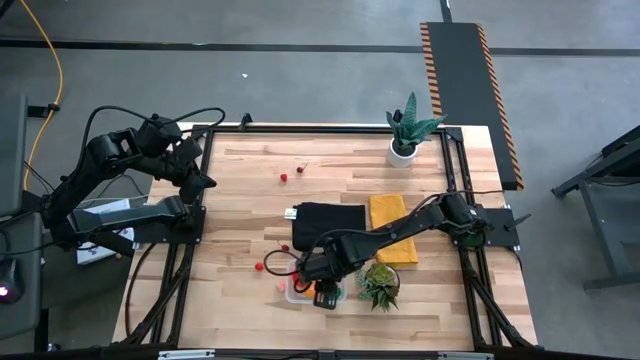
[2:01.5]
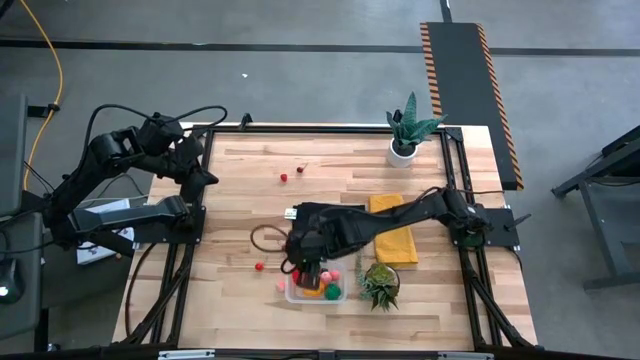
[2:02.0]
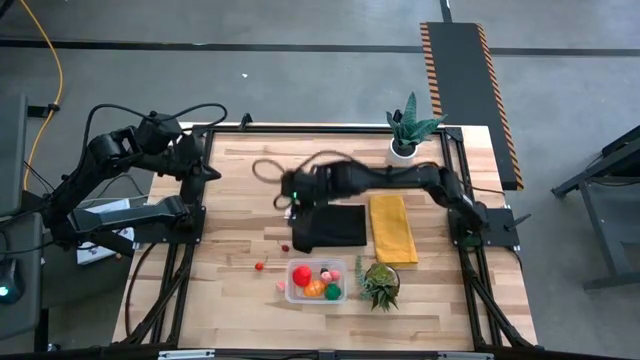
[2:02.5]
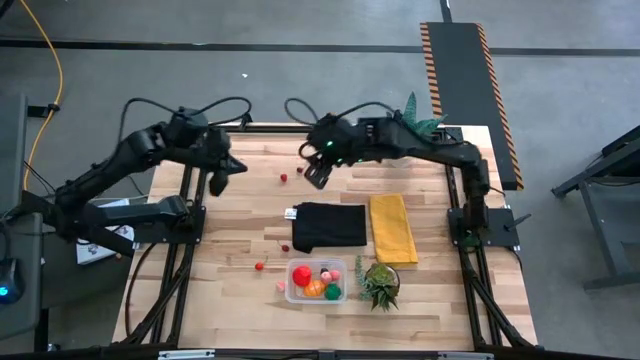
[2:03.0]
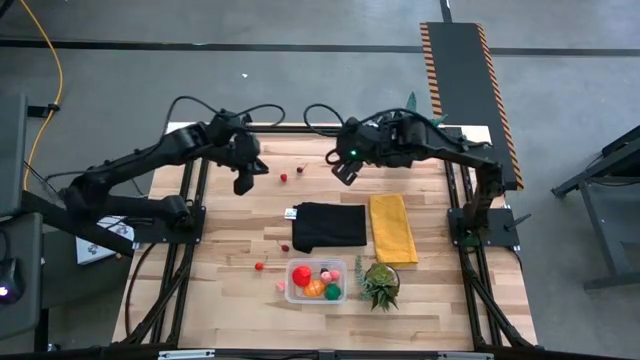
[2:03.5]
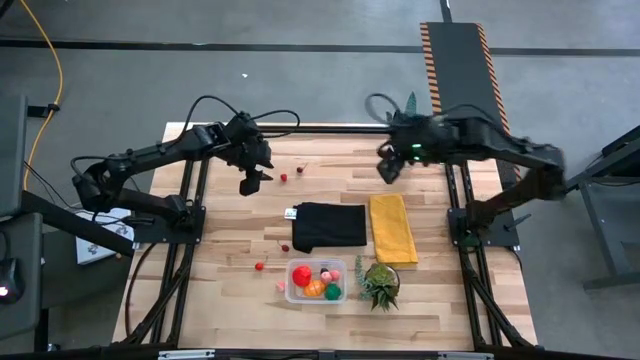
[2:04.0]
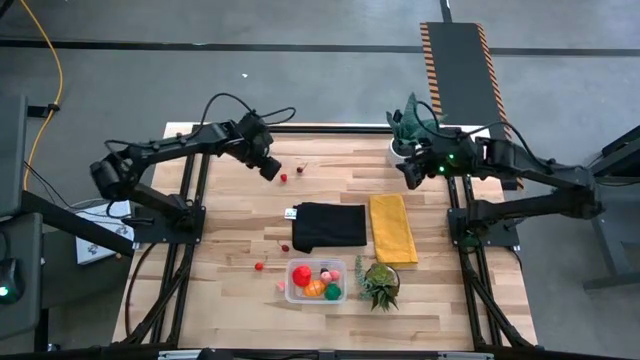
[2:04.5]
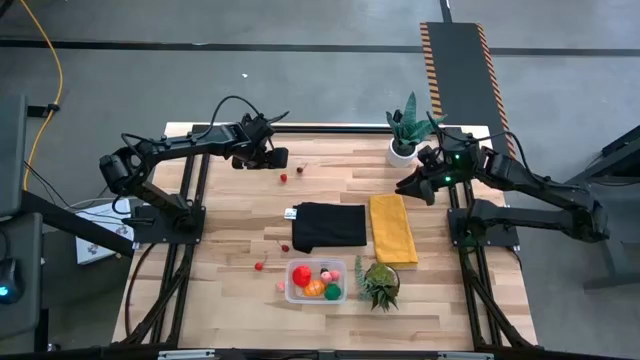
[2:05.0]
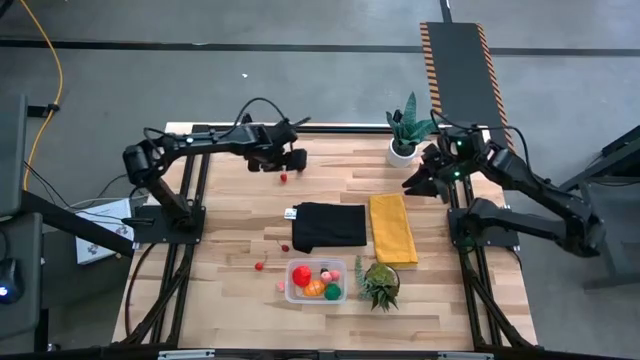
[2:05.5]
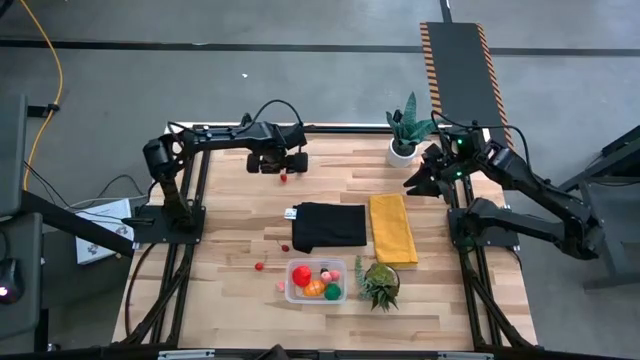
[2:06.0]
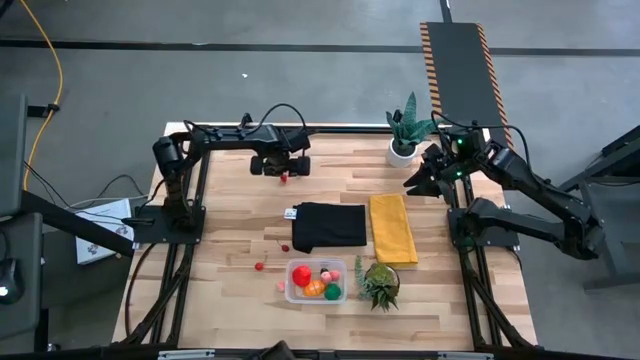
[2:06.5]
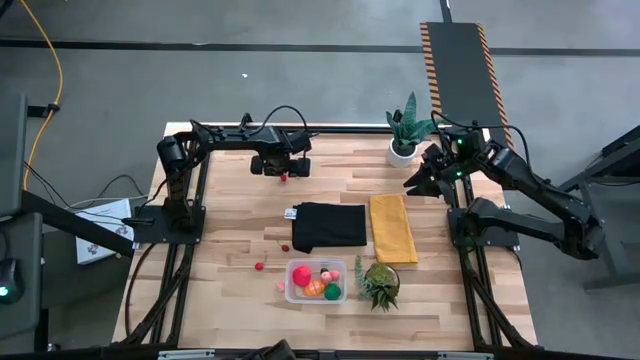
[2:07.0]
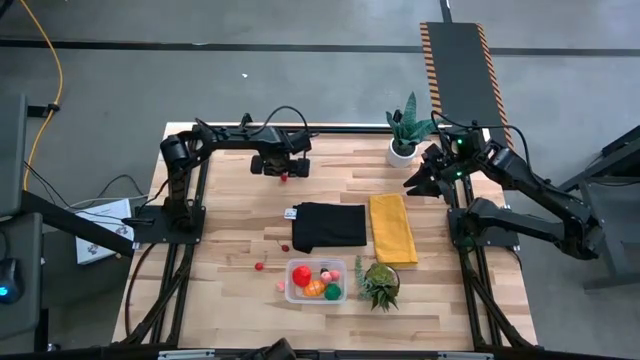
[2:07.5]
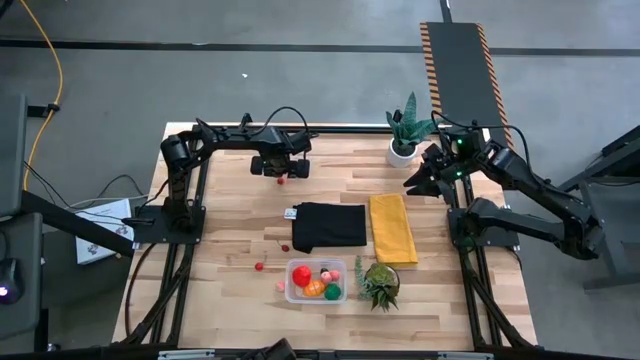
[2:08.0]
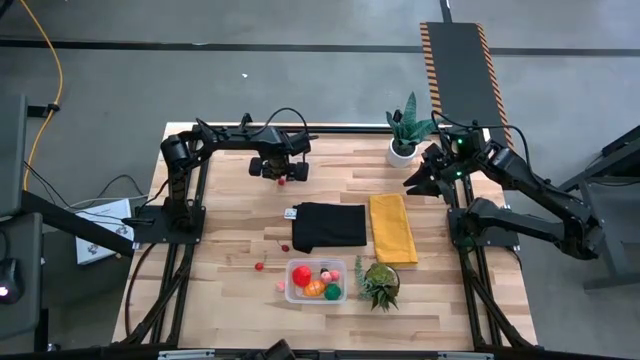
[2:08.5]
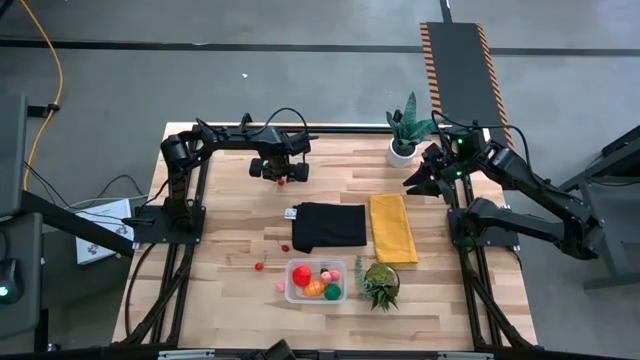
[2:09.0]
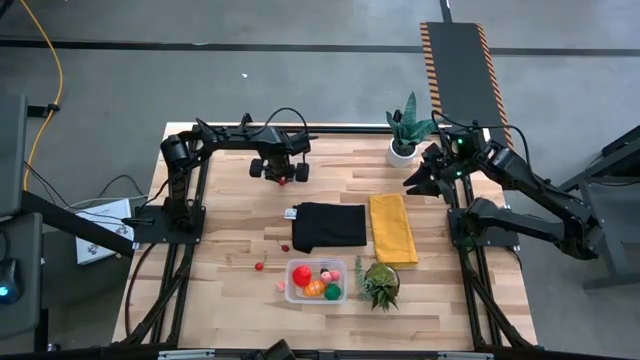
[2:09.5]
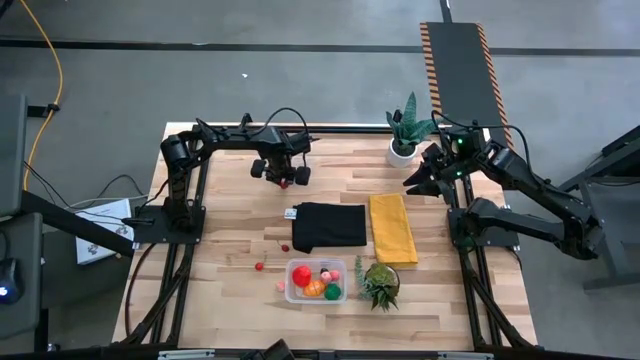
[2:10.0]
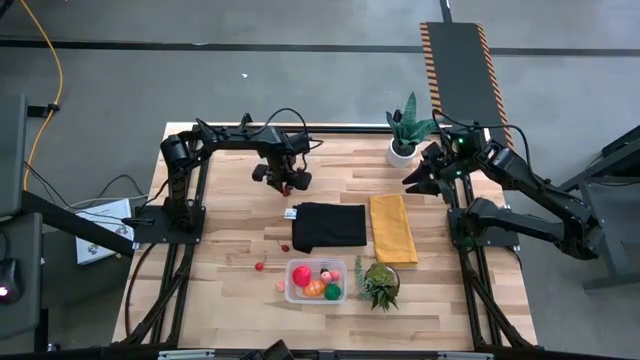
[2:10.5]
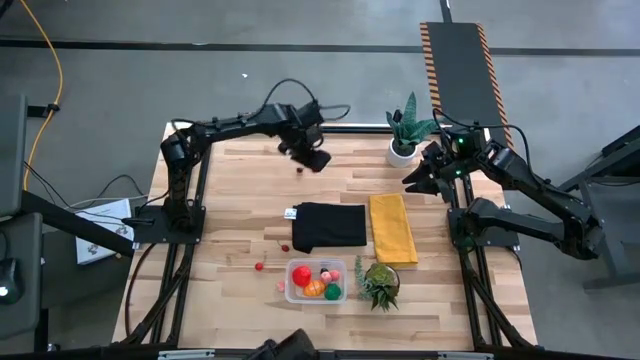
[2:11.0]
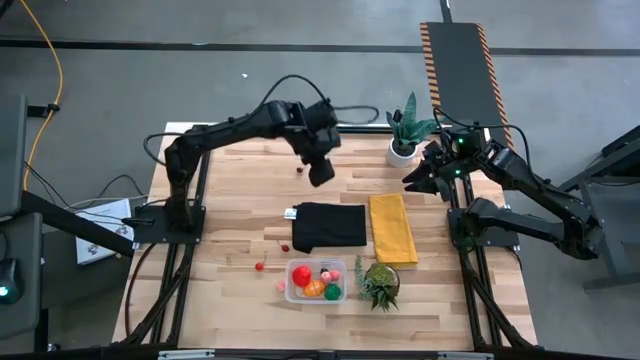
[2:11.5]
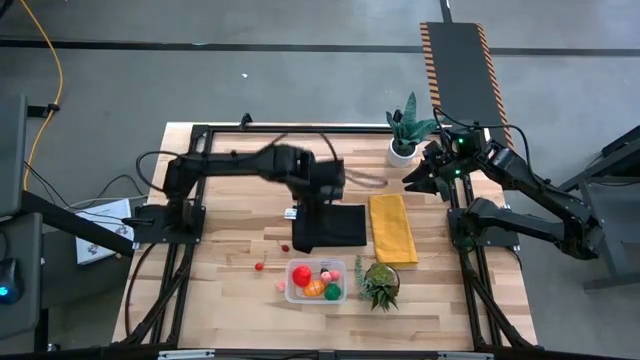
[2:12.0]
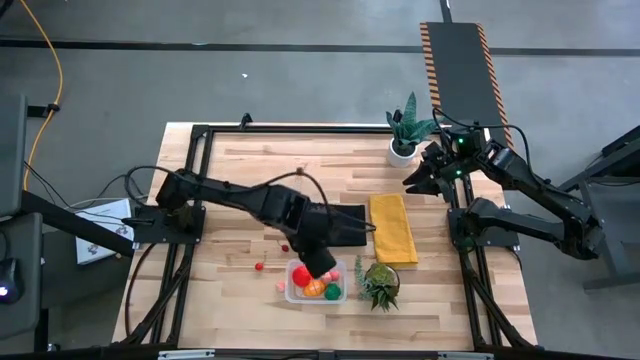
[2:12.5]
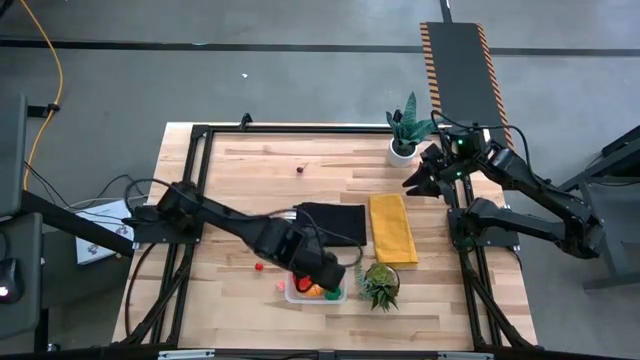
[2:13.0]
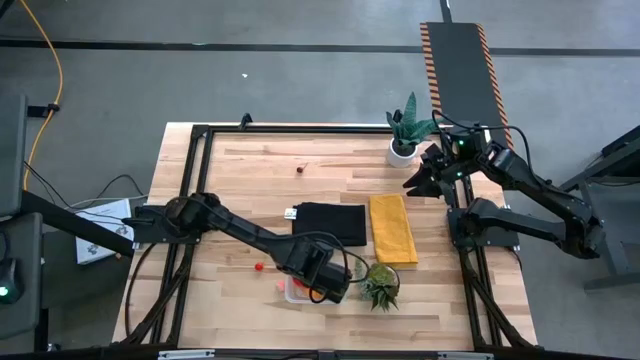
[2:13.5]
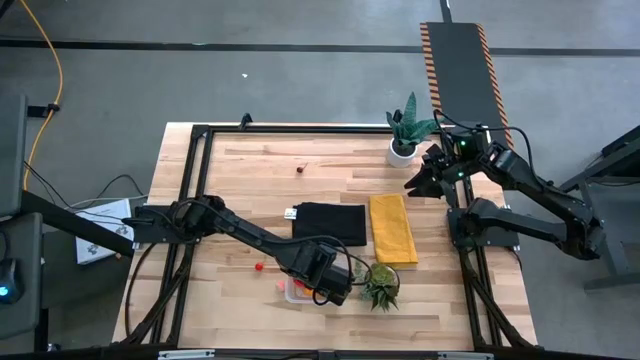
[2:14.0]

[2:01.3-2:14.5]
Task: Pick and placing Produce into tupperware
Put the raspberry into the transparent bin

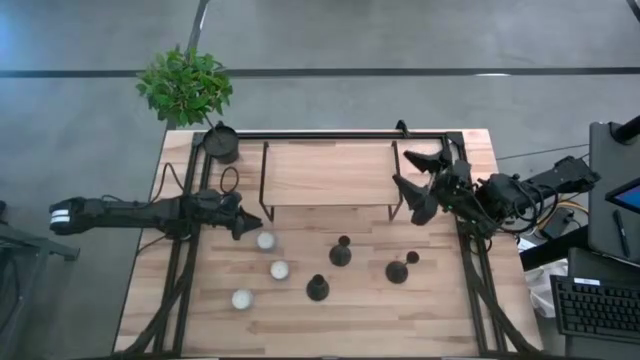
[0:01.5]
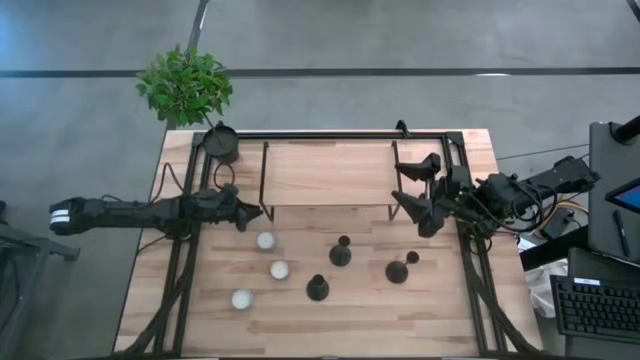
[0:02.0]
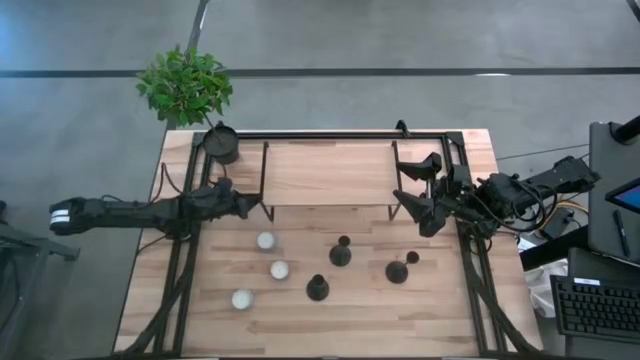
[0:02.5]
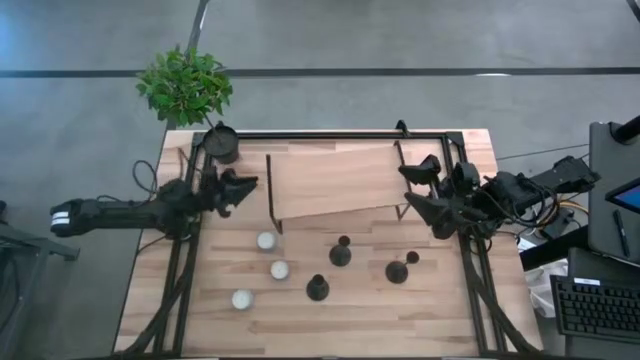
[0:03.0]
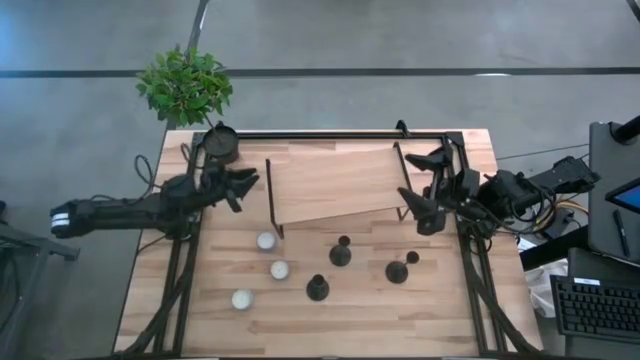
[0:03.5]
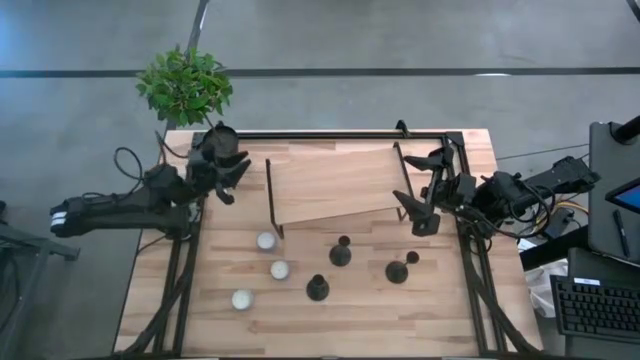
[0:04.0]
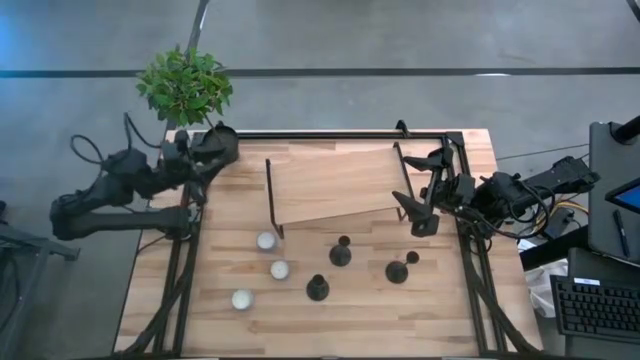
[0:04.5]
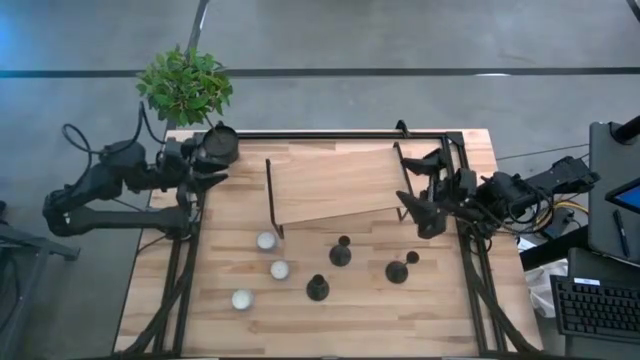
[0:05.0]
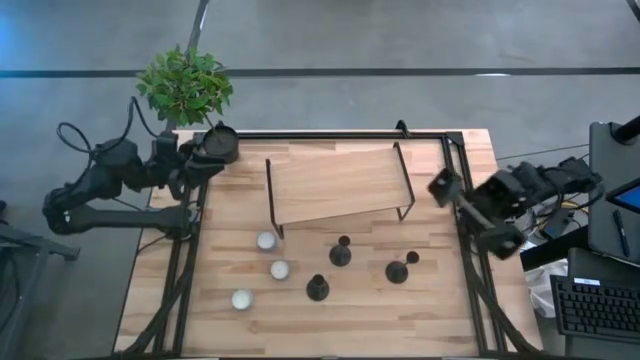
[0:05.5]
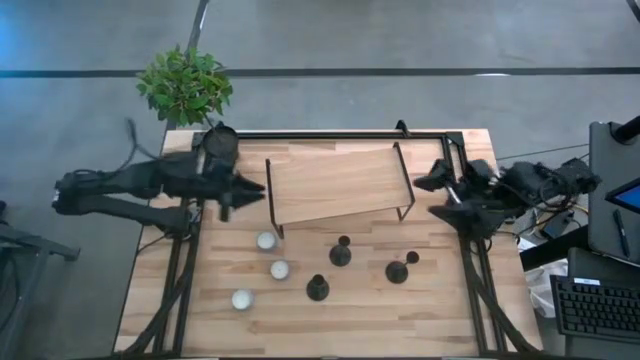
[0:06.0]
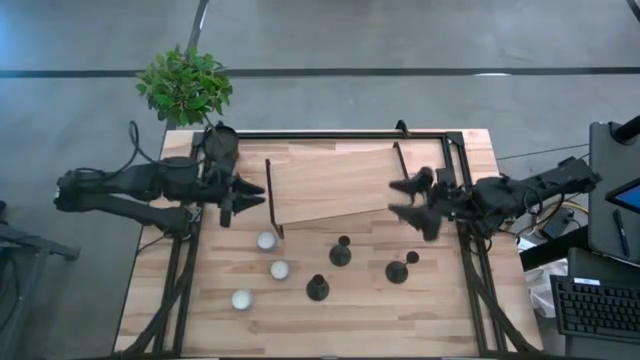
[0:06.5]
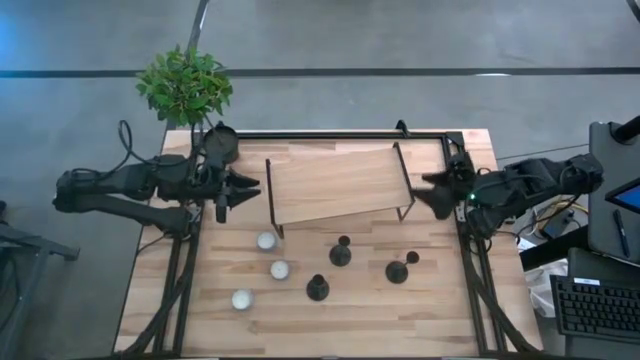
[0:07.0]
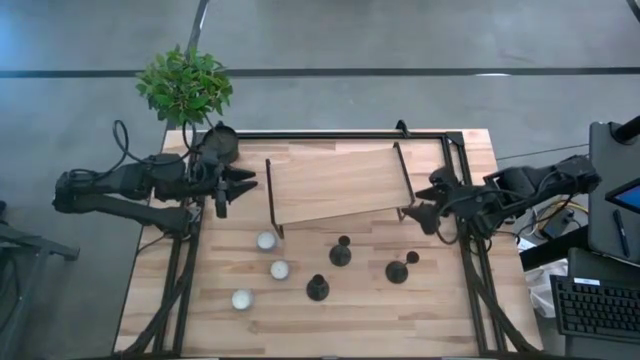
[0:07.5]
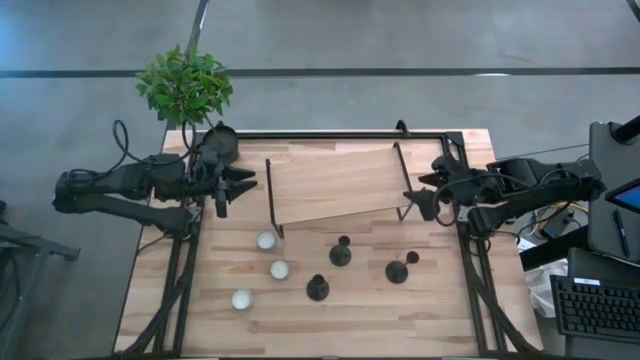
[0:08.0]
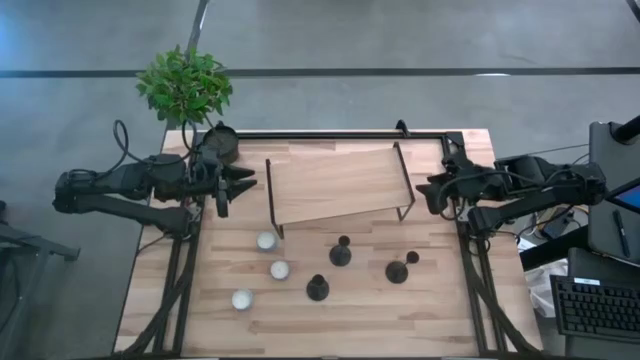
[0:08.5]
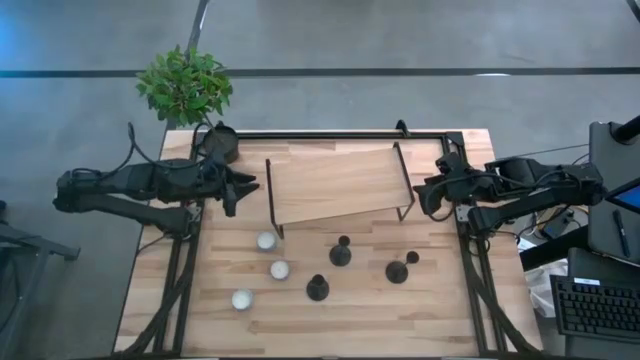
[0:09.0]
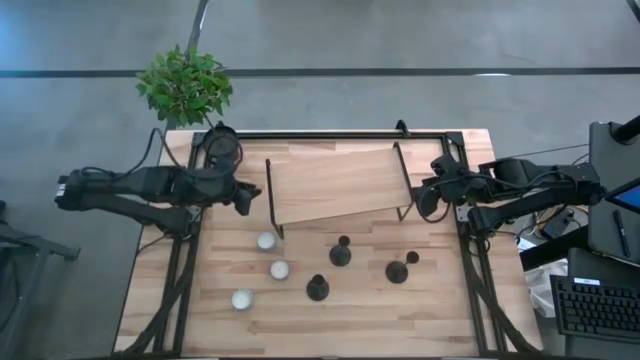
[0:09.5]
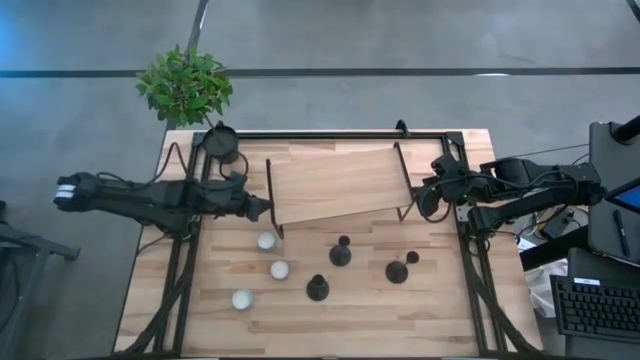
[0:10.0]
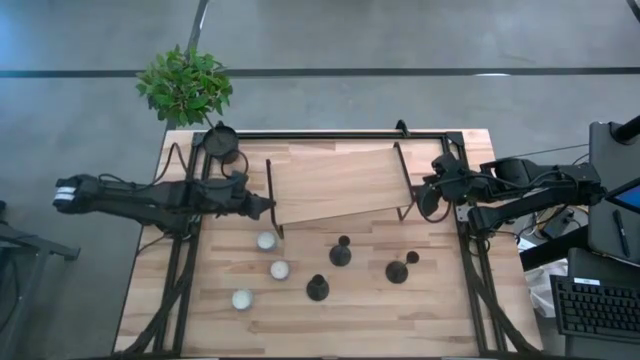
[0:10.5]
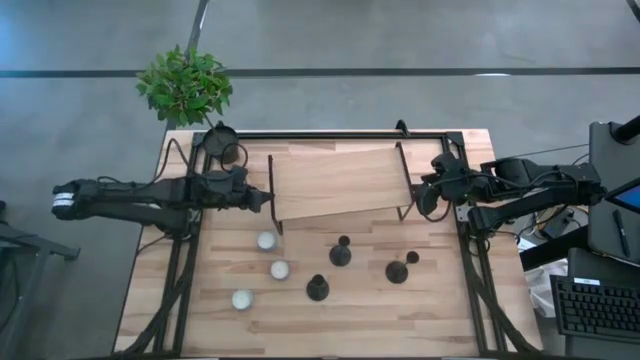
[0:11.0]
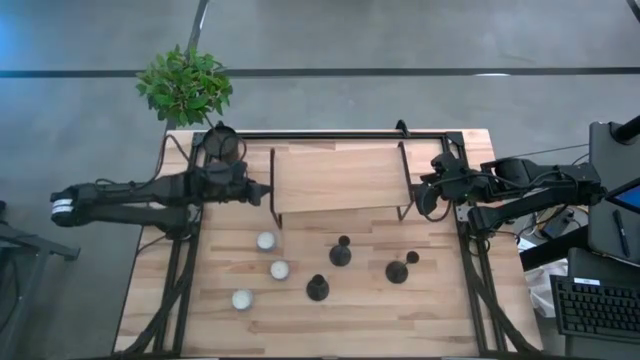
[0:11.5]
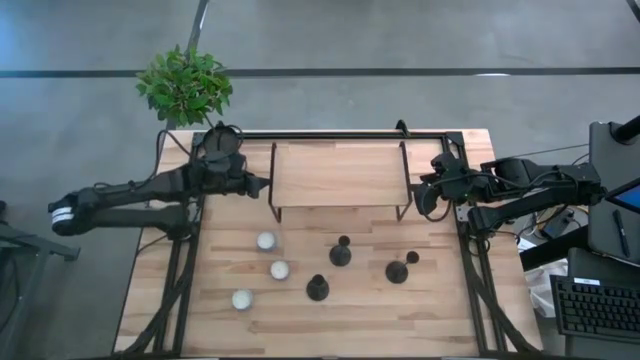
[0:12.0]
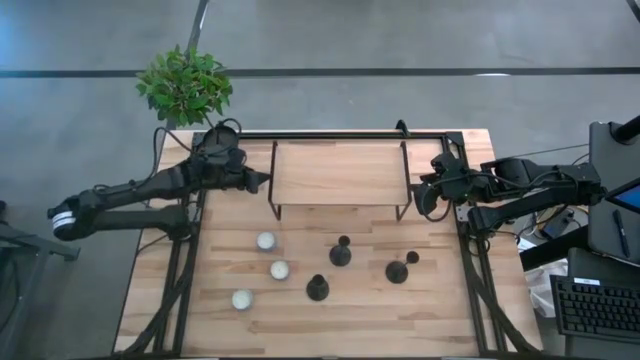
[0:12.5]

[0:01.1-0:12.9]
Task: Pick & Place candle stick holders
Adjust the shelf on the table
